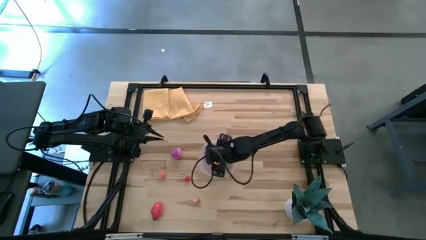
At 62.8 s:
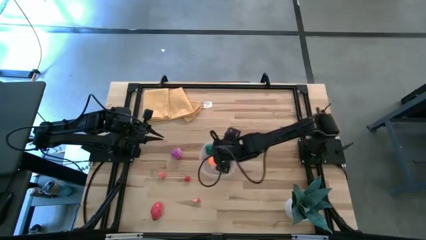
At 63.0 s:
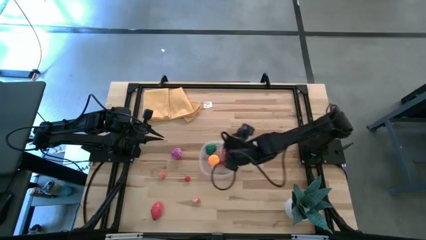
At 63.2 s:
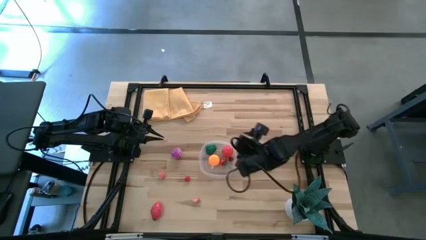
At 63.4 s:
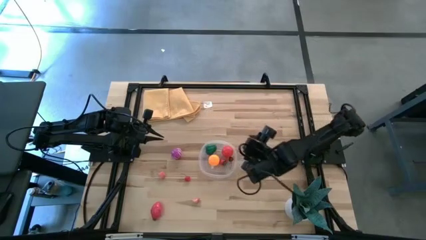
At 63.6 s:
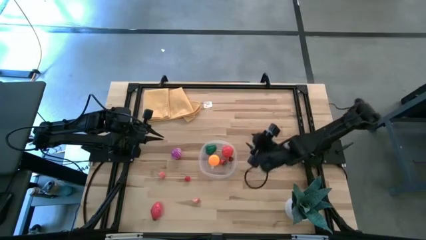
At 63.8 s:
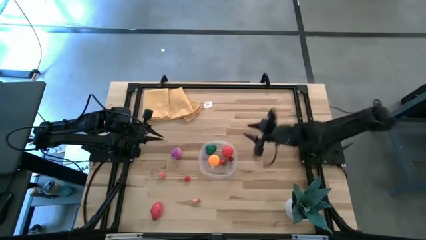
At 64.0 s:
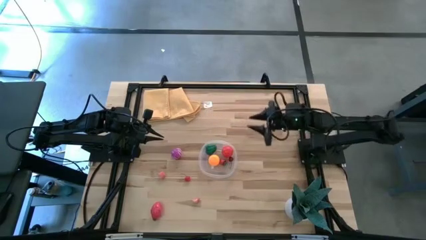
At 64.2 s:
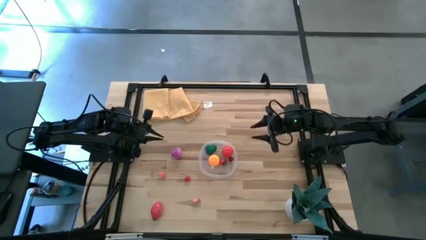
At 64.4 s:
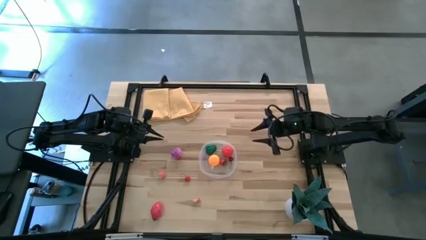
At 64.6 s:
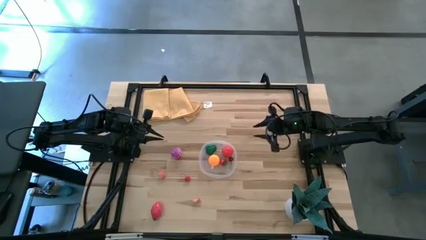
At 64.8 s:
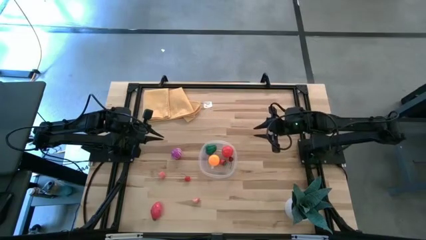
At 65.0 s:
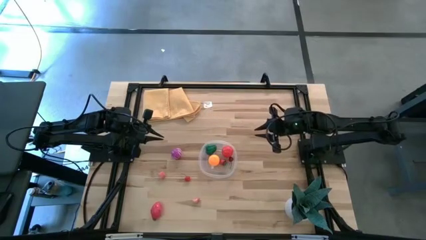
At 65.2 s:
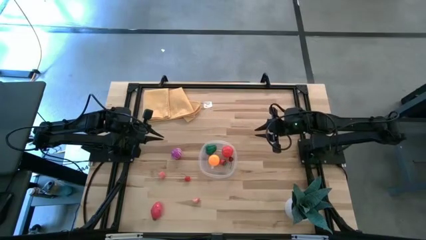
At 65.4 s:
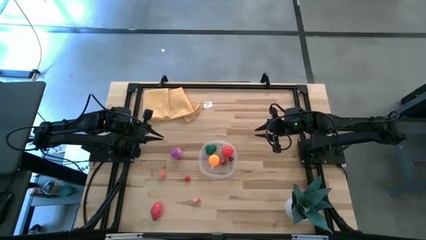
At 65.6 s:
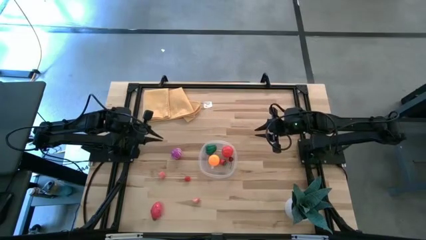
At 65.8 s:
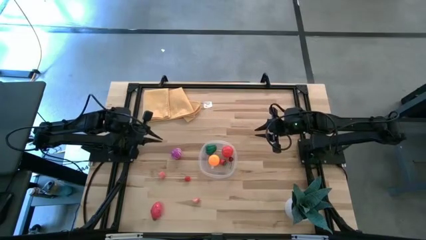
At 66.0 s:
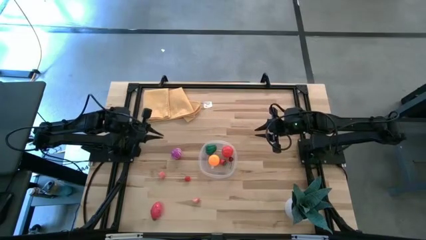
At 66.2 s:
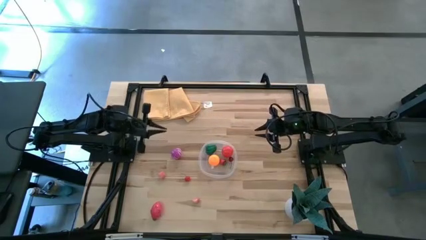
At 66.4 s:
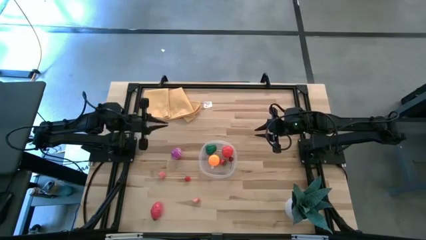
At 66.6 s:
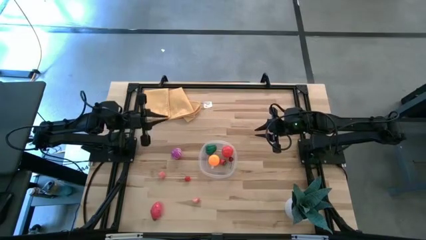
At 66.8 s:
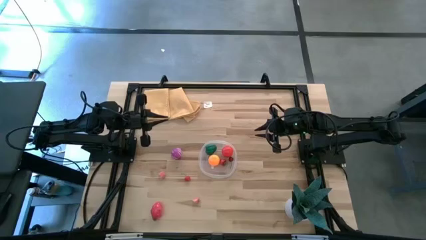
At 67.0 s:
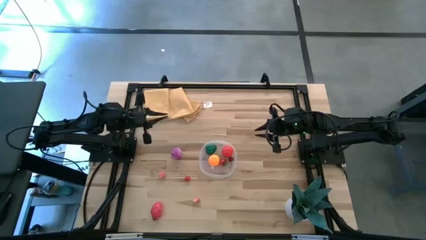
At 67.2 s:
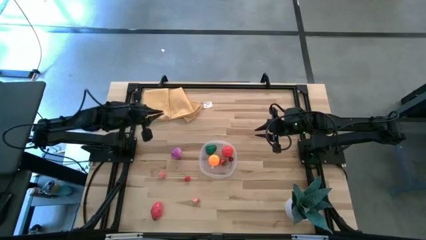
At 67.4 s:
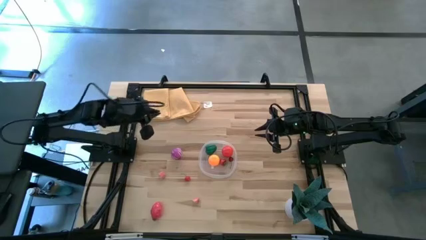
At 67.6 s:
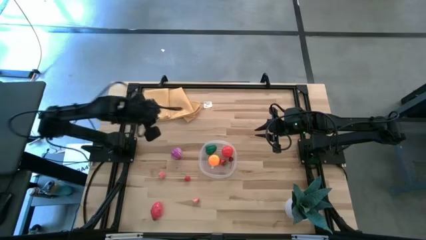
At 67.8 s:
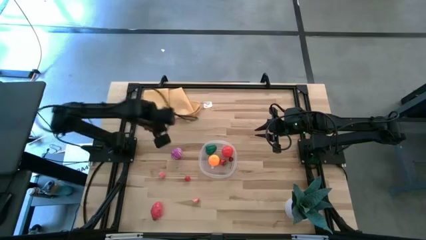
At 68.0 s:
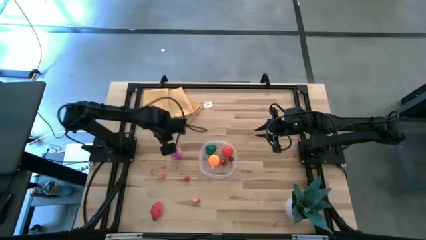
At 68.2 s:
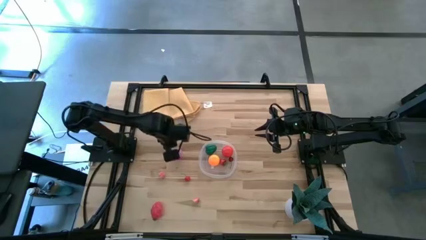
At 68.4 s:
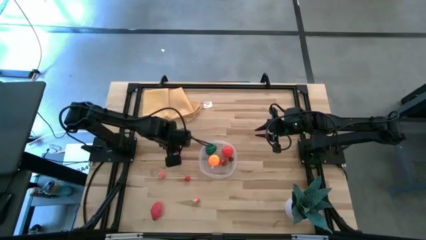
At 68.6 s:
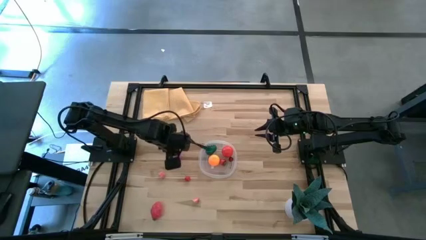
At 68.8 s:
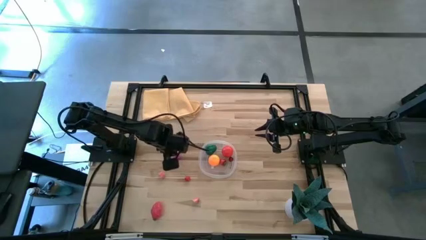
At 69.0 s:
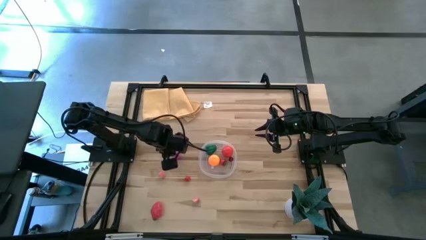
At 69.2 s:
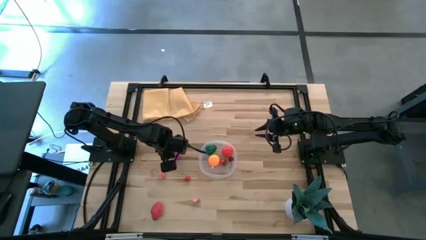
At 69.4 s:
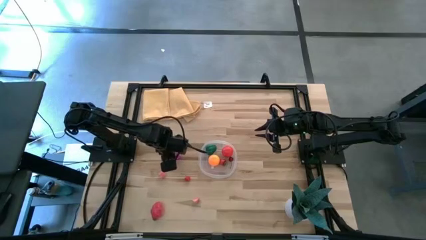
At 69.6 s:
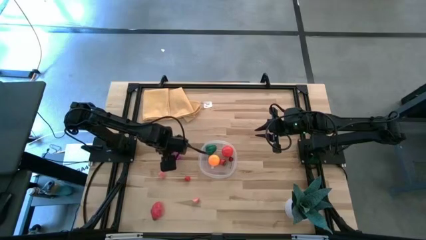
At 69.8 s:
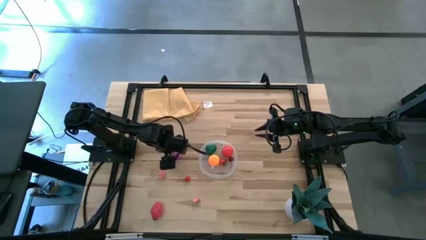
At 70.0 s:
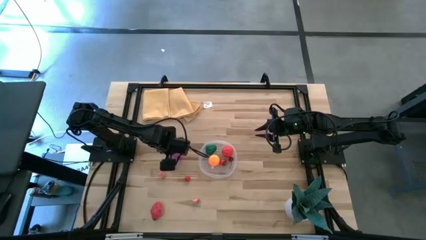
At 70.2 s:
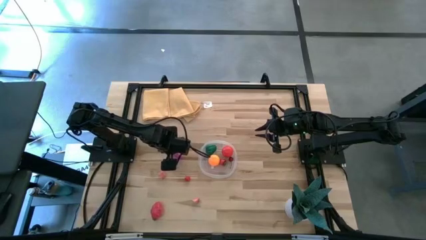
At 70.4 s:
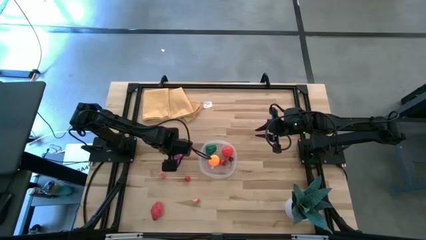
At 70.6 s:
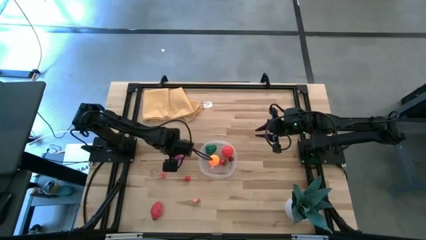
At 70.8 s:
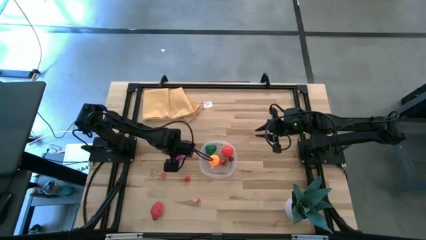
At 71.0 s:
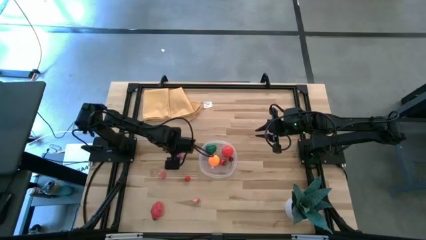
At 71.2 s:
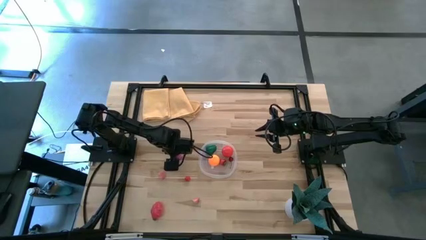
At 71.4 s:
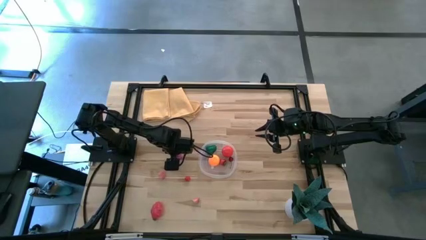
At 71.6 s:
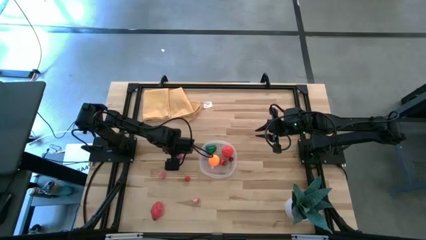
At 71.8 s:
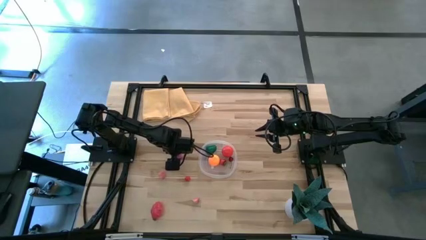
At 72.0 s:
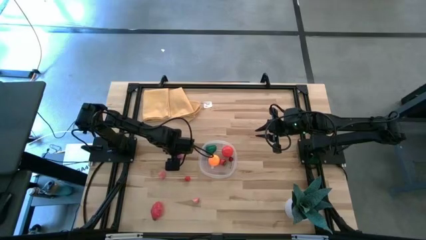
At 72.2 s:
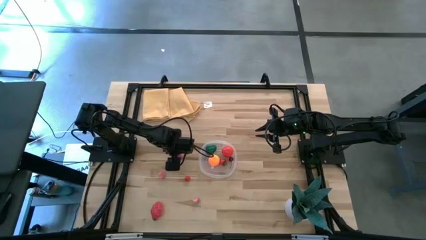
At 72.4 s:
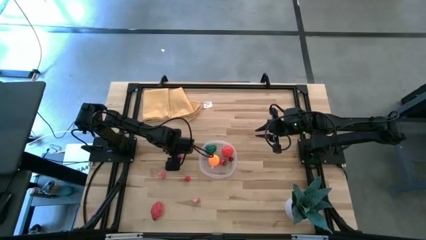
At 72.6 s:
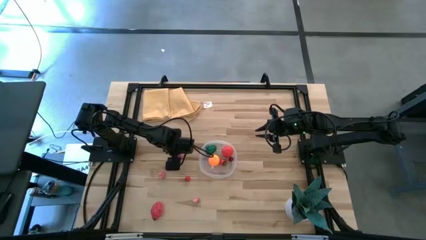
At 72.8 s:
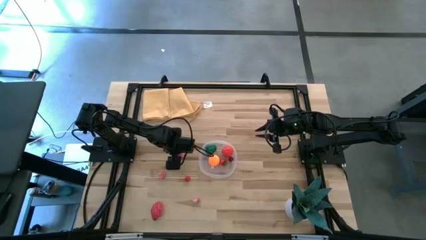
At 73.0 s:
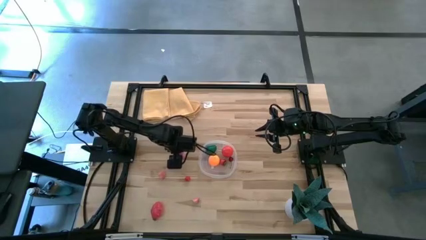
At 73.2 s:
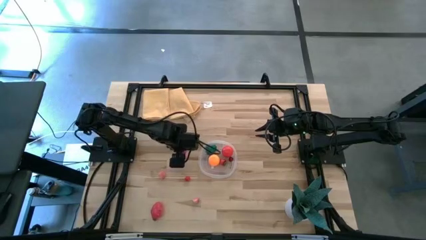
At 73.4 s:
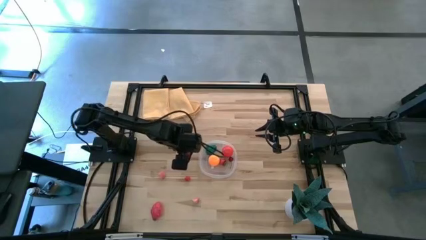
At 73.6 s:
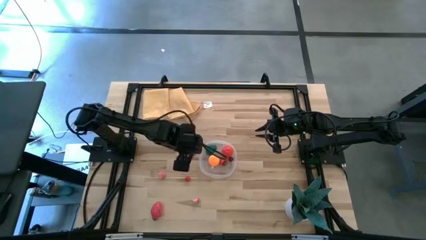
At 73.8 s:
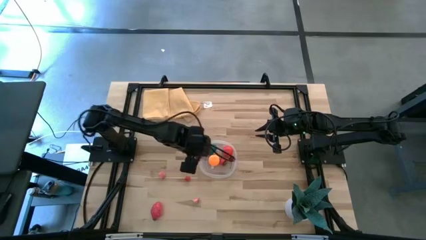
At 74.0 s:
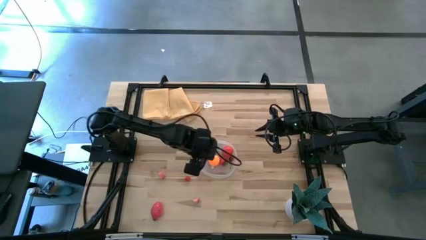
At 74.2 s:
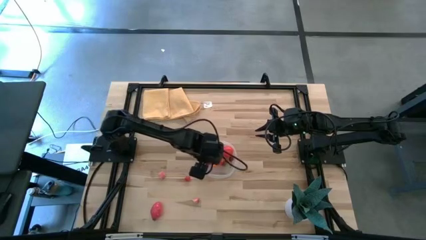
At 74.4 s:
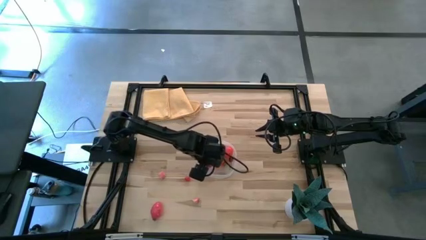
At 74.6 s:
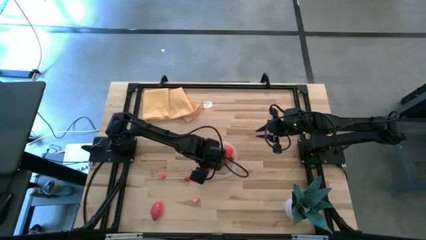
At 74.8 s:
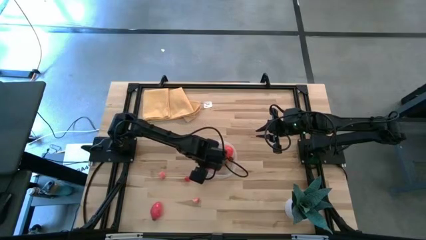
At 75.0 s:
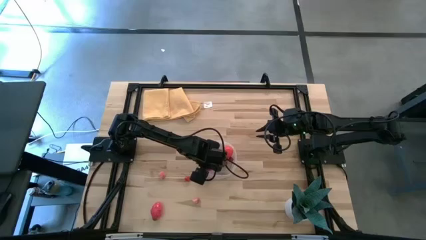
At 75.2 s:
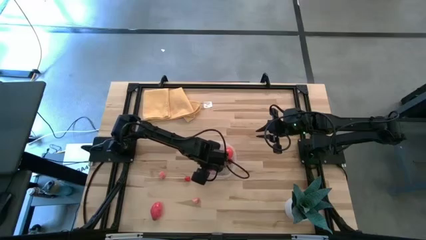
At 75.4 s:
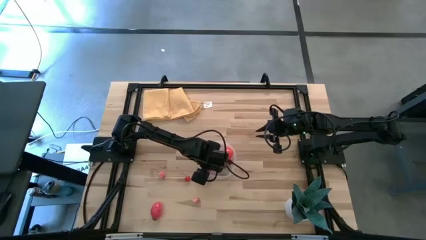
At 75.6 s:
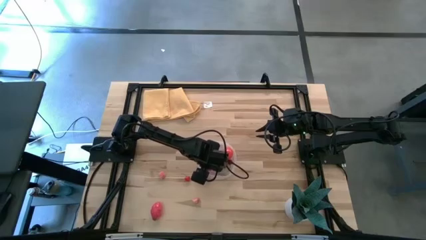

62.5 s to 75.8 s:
Task: Pick and placing Produce into tupperware
Put the violet onion into the transparent bin

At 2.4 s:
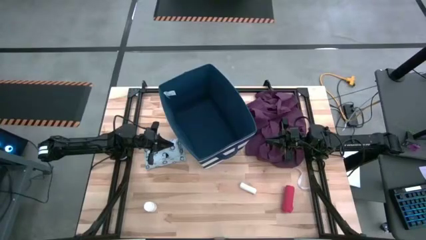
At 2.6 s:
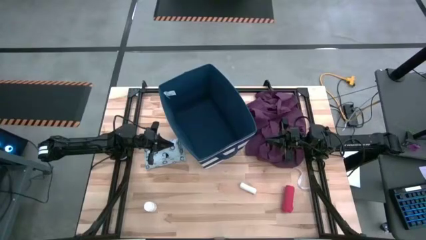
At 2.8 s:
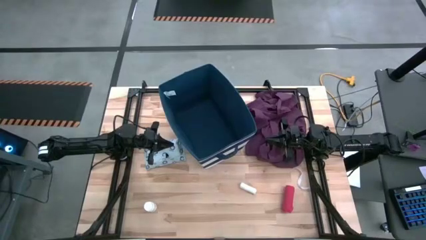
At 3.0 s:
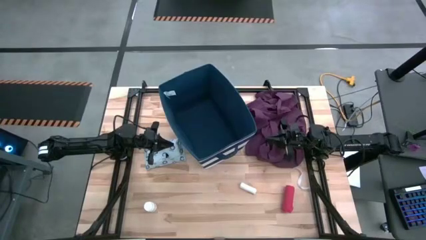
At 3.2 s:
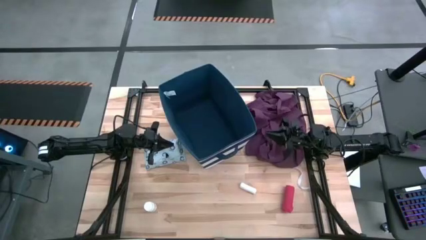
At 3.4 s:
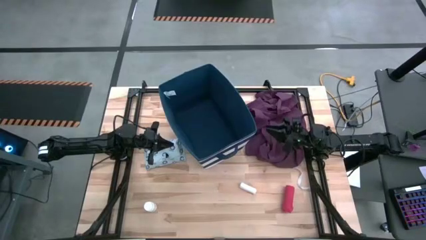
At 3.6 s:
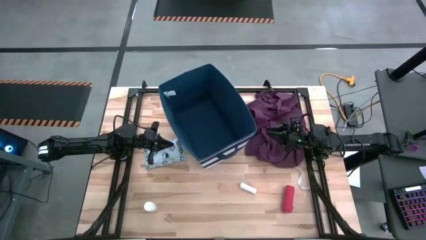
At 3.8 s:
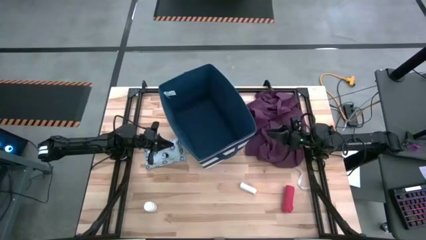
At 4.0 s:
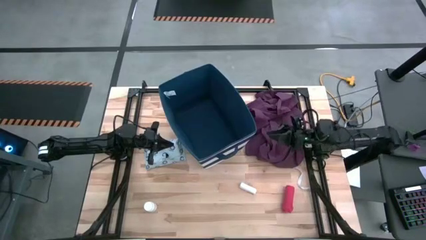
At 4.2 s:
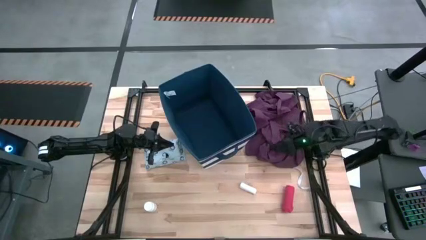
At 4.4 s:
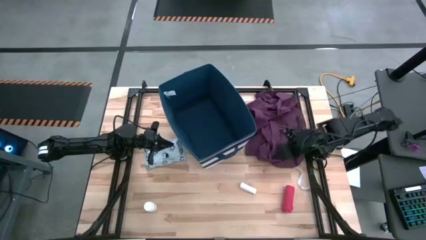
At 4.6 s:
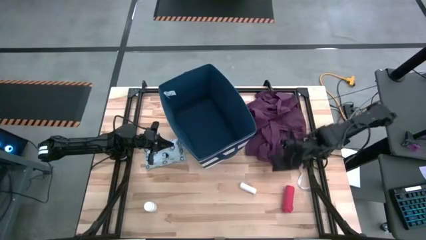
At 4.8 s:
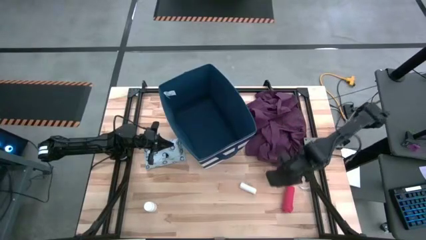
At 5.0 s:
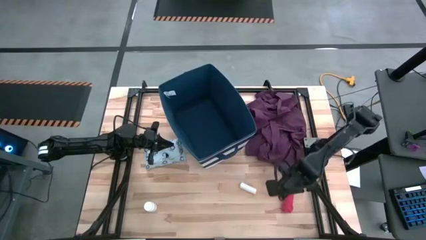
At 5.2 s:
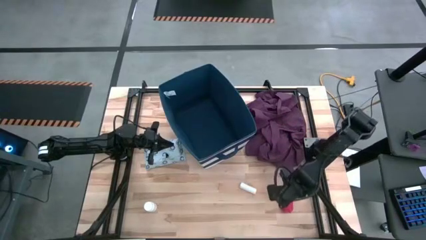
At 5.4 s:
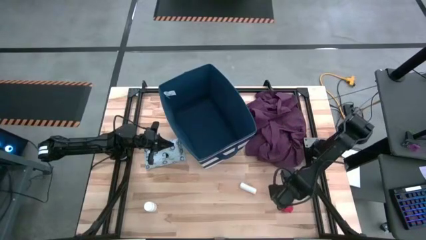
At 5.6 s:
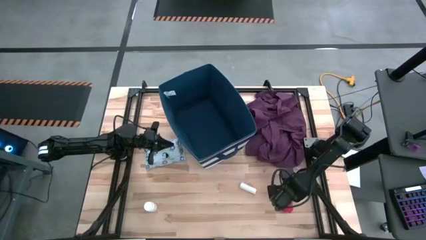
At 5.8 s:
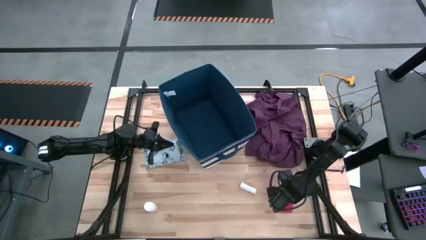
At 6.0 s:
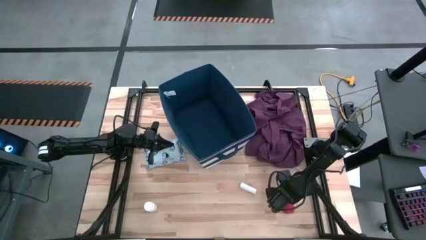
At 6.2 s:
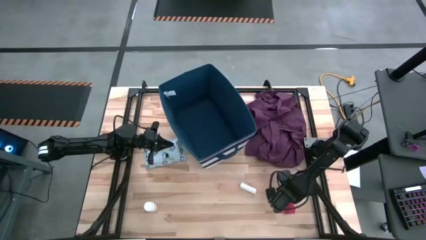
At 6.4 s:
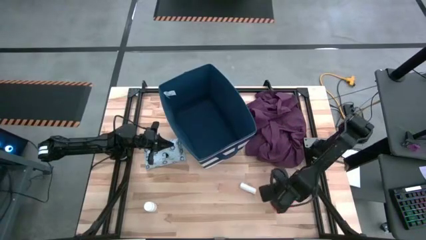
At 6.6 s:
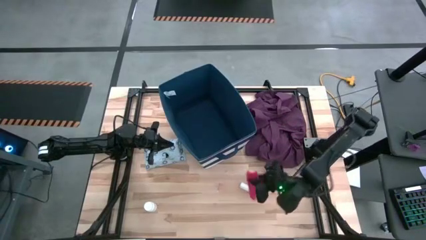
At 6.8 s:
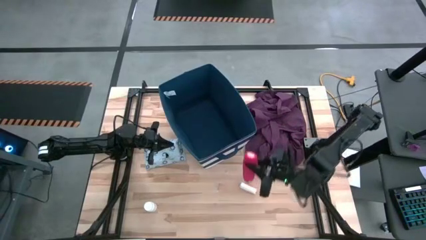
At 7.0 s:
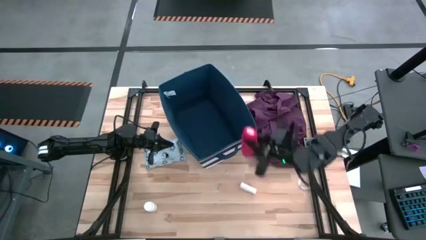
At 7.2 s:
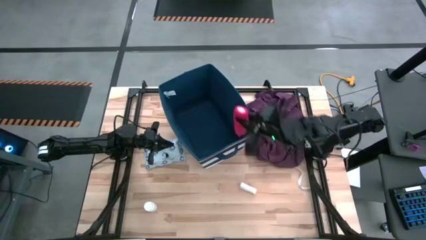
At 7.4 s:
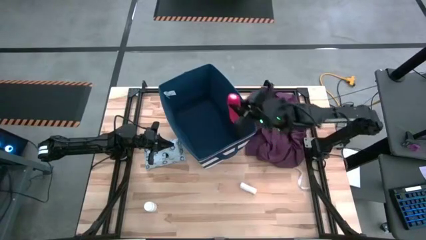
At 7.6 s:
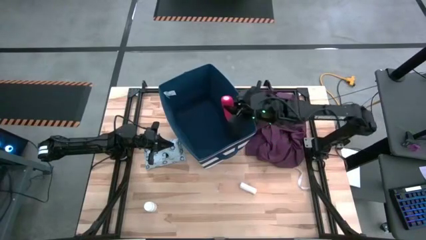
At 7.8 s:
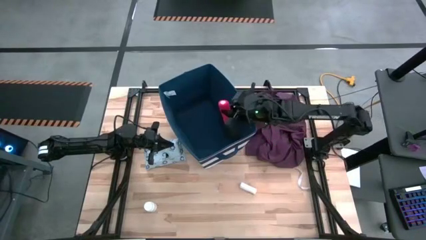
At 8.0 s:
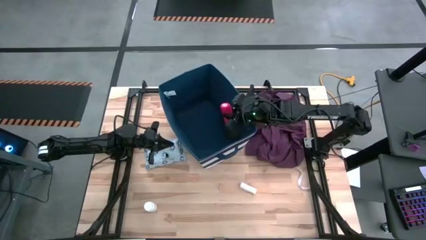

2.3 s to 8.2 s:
Task: Pick & place medical supplies in basket/bin
Put the red bandage into the laundry bin
